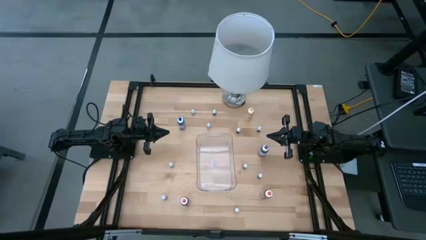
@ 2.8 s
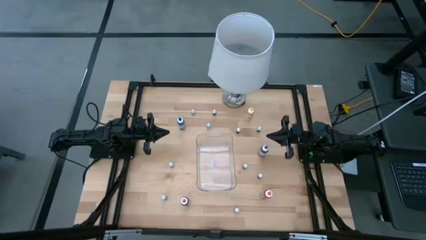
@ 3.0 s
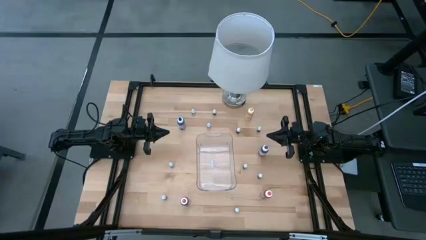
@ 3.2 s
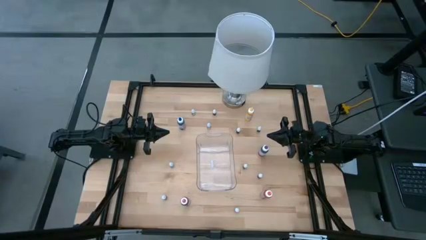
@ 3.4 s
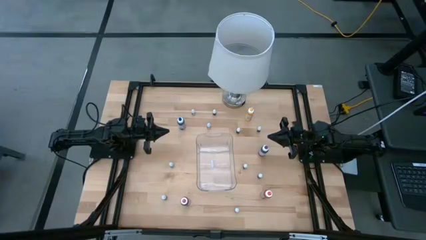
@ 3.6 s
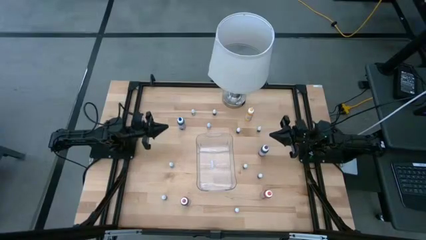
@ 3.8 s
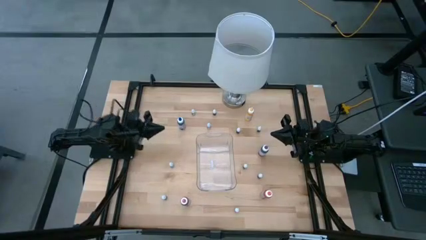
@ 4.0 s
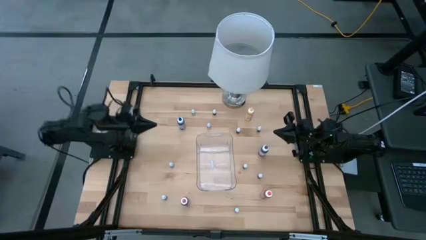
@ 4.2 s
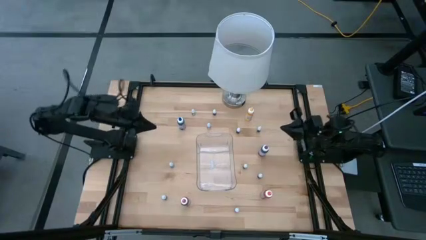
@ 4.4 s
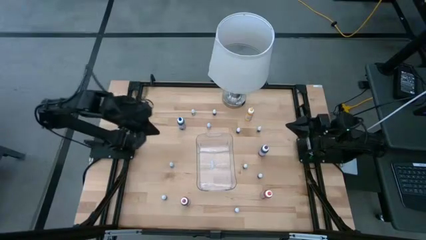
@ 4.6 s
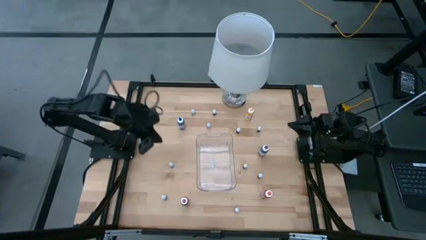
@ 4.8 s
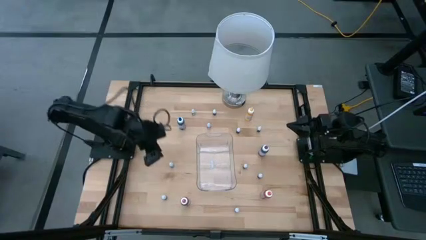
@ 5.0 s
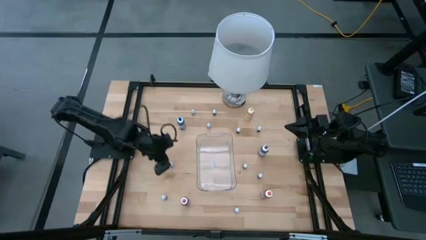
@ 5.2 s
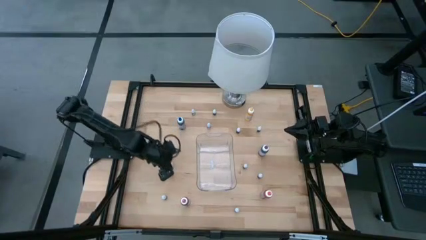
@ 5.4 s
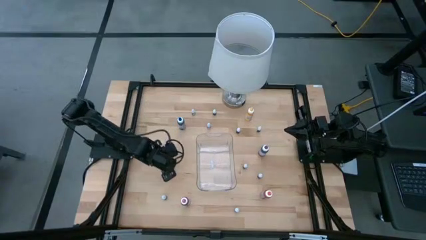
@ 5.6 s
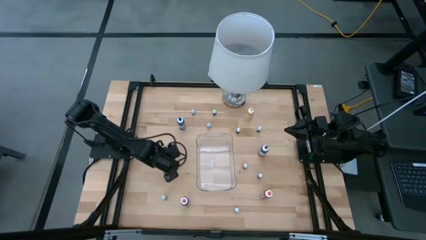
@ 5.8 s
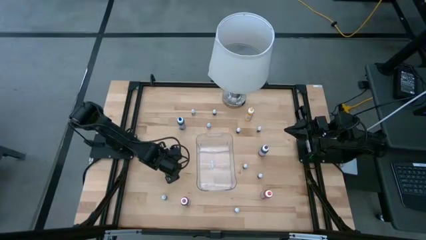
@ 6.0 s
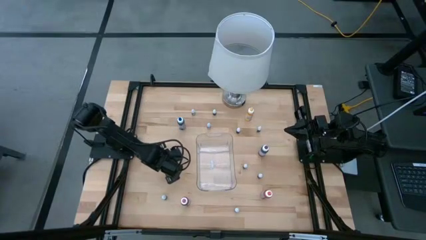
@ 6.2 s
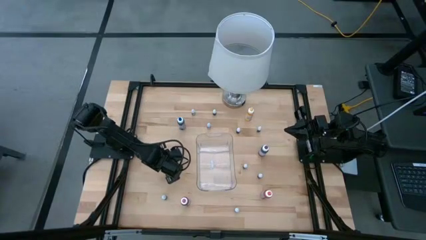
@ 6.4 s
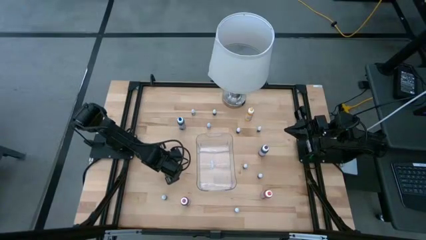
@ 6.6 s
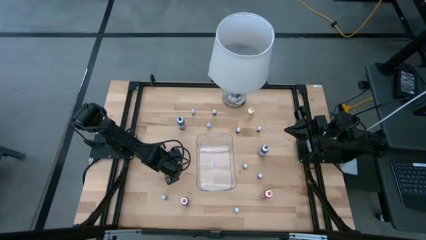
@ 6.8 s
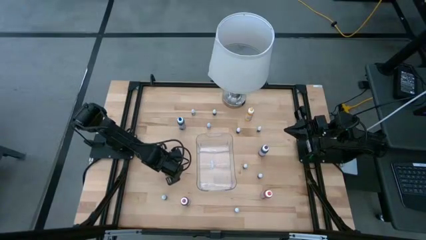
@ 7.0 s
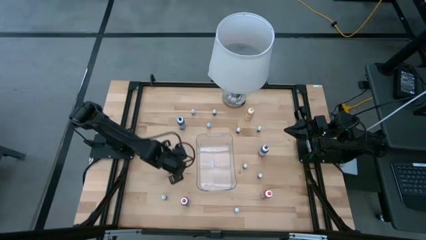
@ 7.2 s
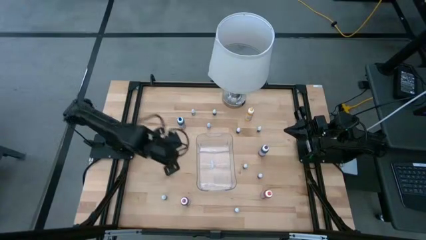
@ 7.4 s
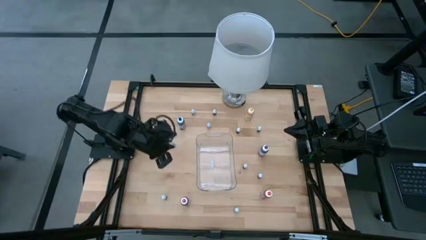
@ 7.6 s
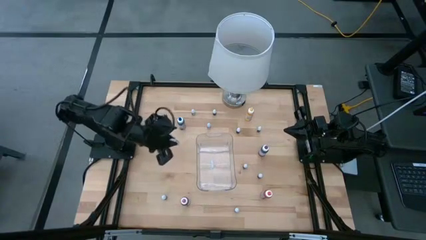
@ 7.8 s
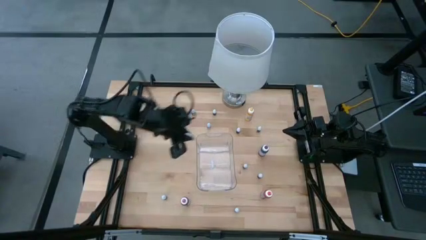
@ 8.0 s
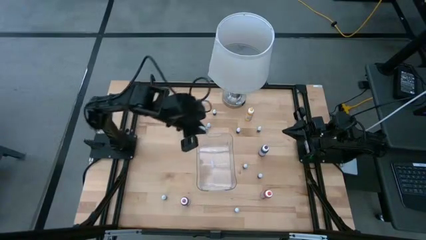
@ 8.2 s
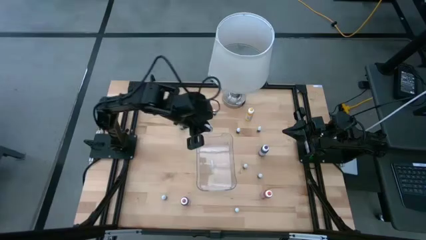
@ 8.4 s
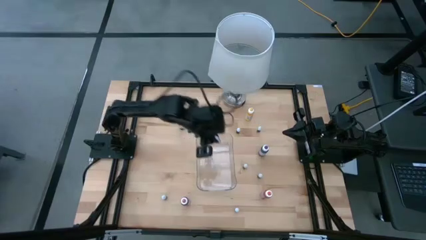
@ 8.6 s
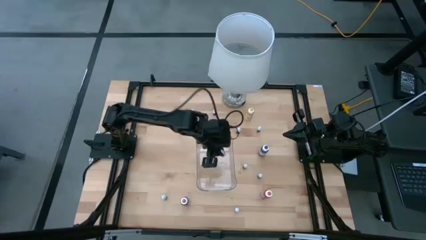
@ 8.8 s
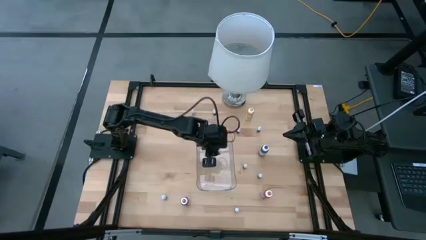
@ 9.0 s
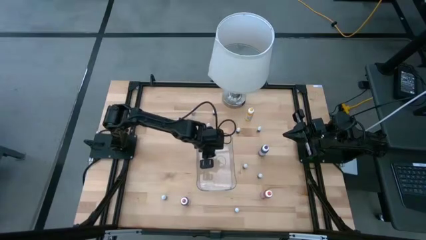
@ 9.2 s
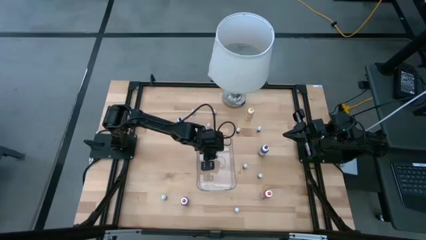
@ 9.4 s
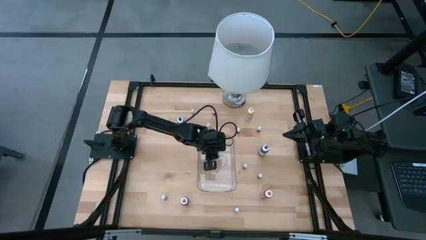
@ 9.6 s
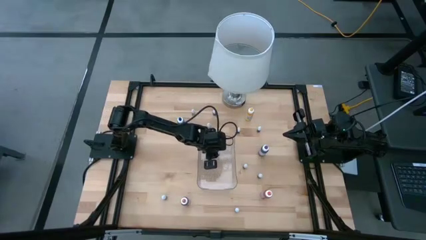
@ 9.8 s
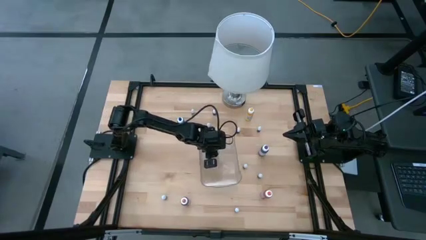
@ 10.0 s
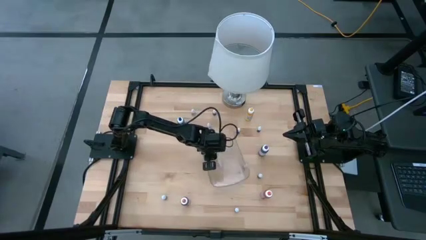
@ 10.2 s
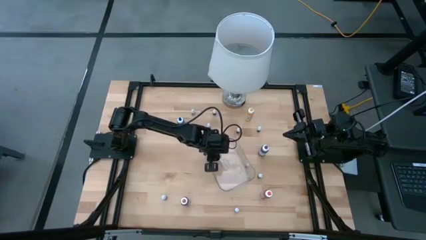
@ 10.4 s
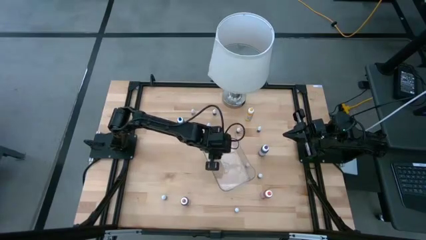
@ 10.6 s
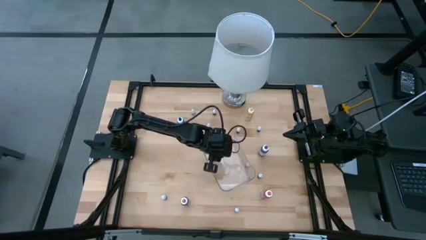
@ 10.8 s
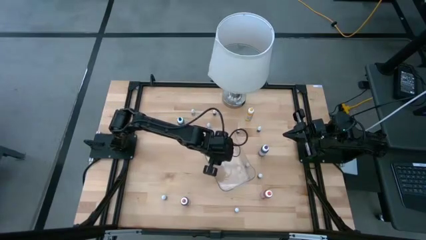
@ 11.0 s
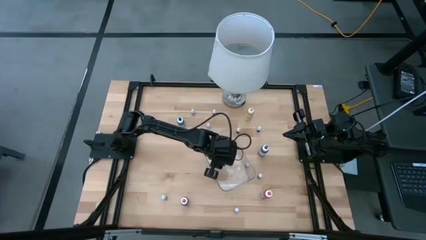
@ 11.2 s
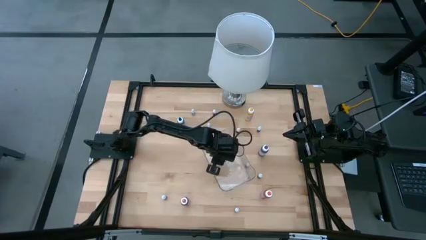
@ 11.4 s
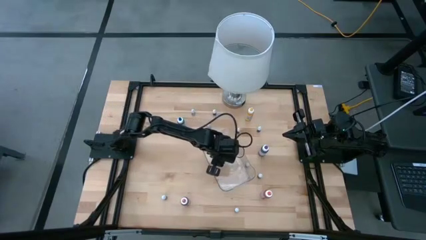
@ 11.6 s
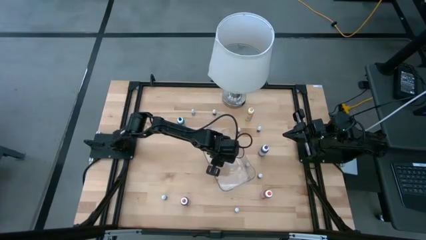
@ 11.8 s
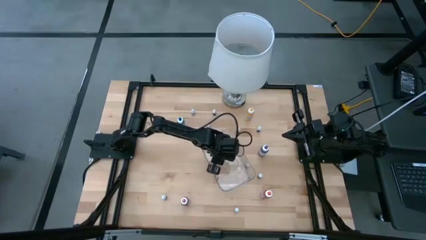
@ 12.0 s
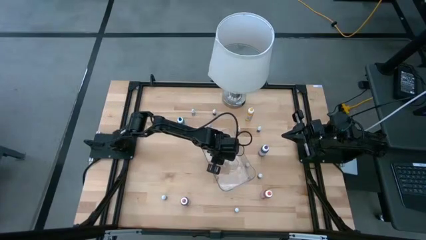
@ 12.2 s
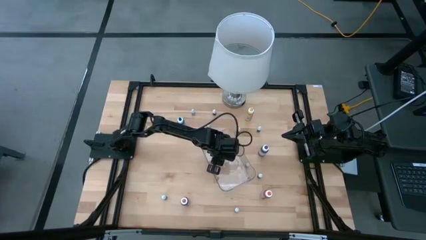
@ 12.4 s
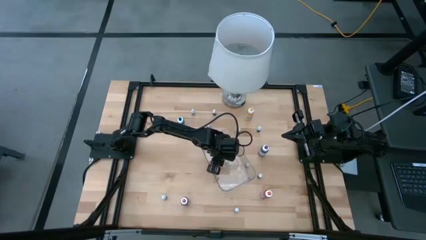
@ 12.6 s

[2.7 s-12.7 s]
Task: Pick & Place food coloring
Put the bottom left small blue food coloring bottle into the transparent bin

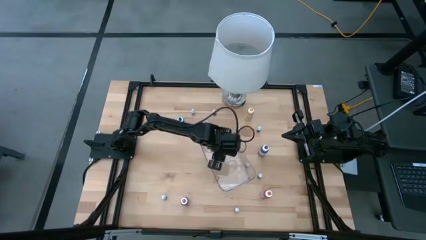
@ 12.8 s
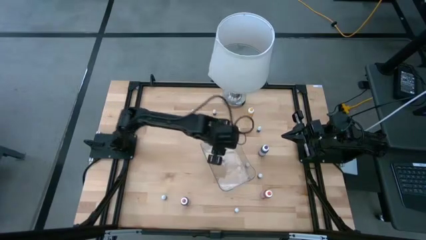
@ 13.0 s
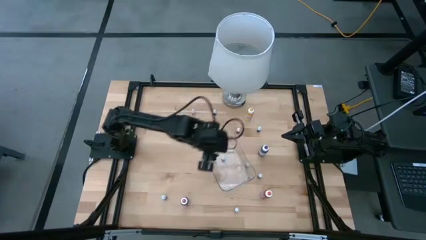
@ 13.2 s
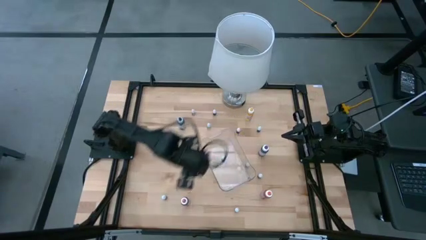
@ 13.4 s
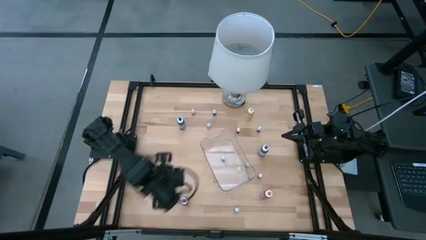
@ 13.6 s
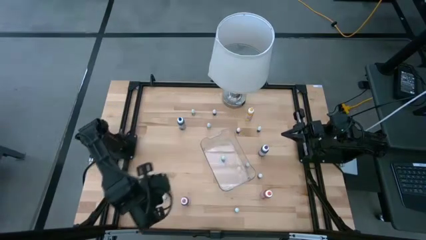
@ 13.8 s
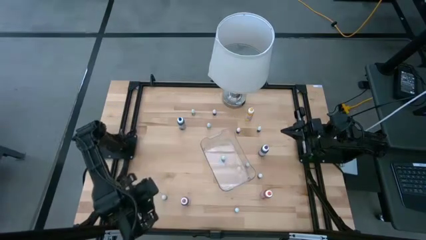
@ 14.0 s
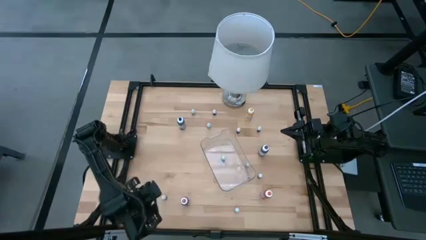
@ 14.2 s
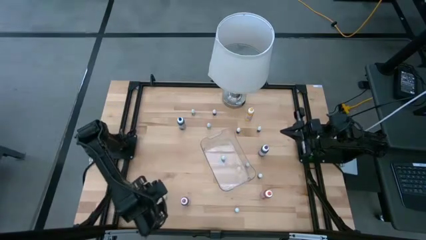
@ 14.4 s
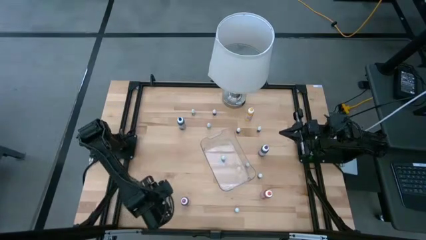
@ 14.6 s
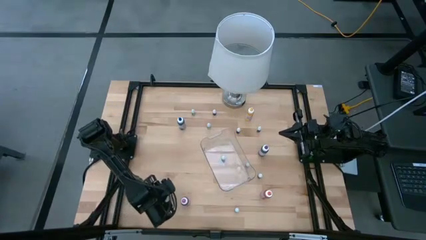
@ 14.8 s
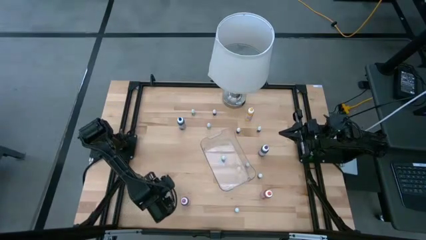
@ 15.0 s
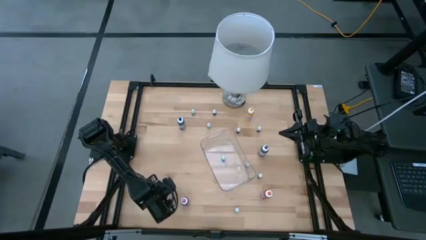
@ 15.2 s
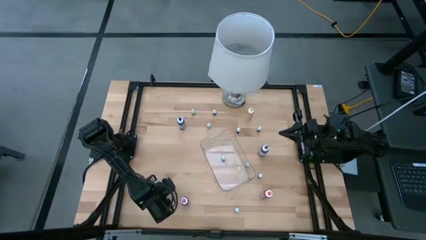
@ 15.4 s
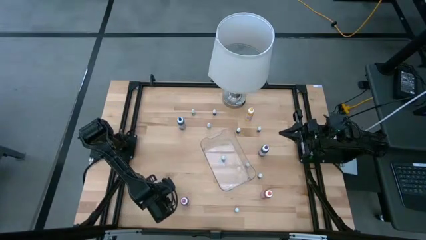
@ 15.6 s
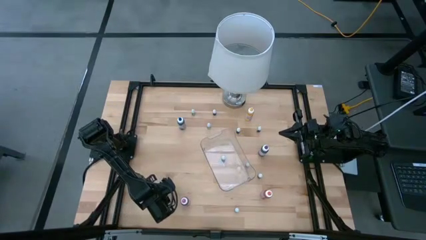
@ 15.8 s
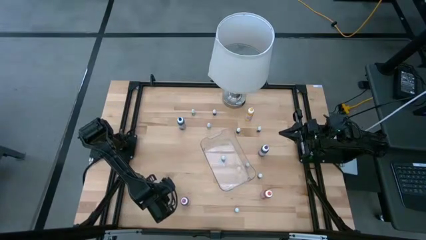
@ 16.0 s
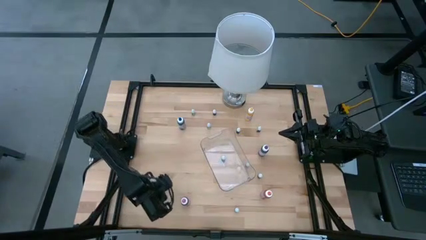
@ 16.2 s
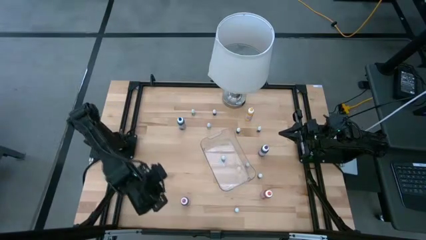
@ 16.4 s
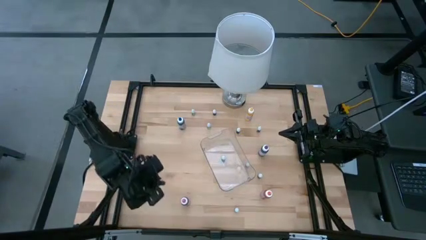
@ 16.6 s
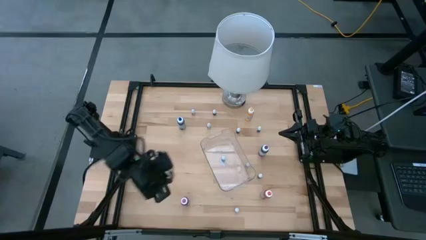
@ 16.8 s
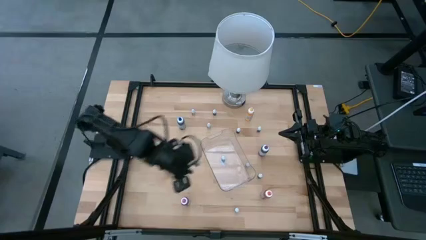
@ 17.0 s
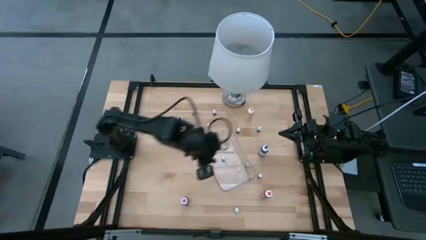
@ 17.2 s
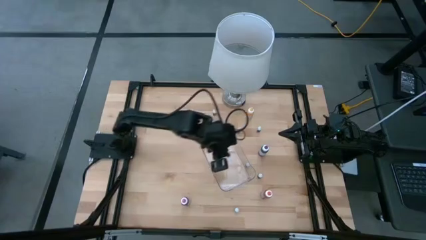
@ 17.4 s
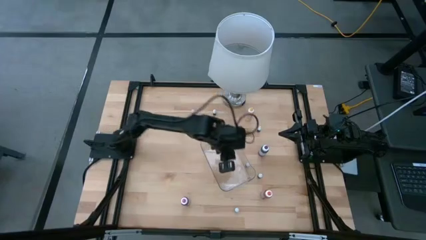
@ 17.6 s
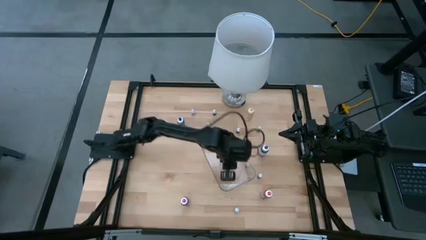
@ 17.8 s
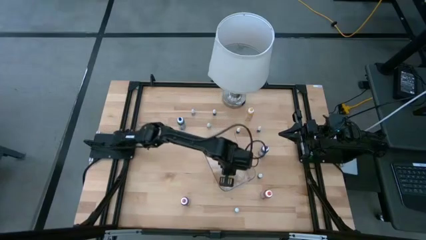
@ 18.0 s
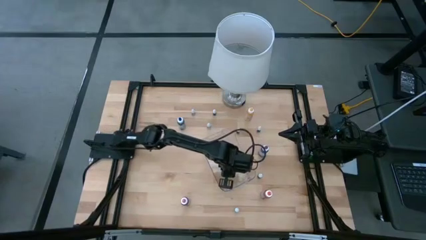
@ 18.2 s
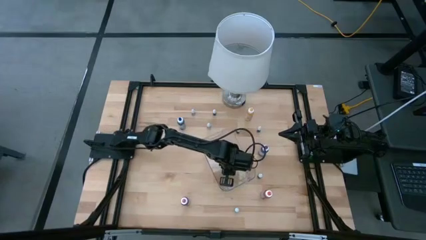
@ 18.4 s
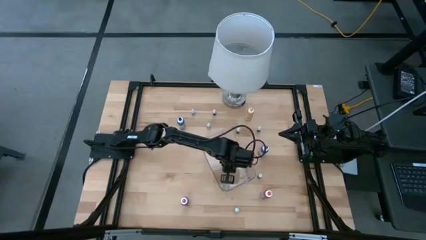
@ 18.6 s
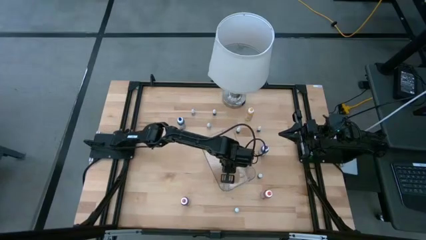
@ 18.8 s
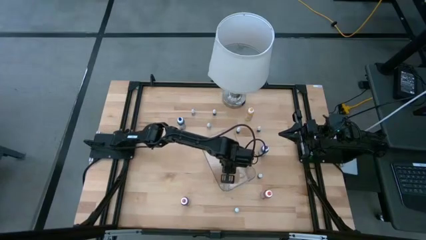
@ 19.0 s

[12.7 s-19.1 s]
Put the bottom left small purple food coloring bottle into the transparent bin

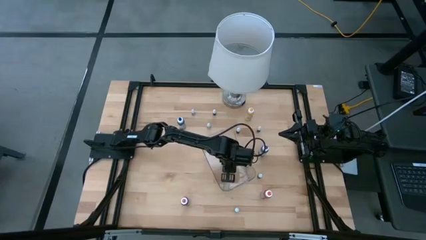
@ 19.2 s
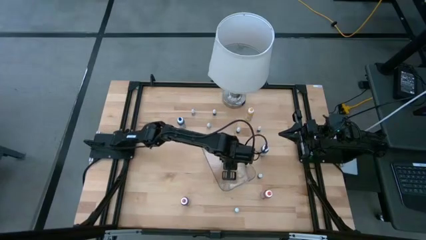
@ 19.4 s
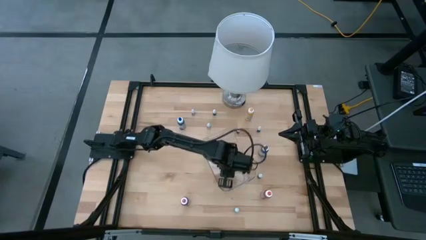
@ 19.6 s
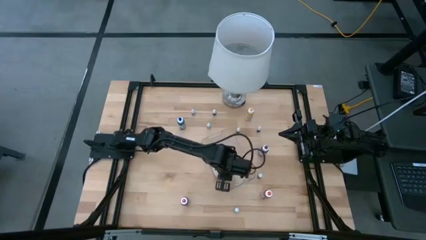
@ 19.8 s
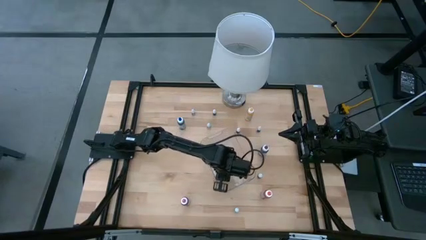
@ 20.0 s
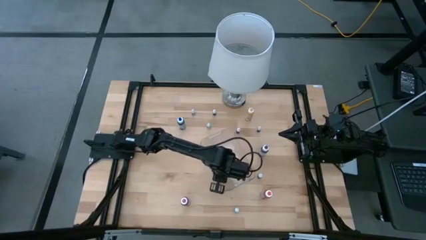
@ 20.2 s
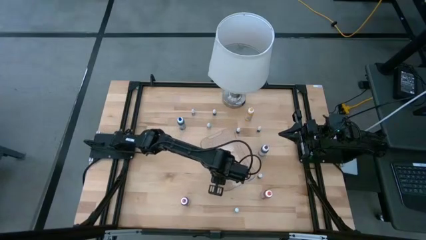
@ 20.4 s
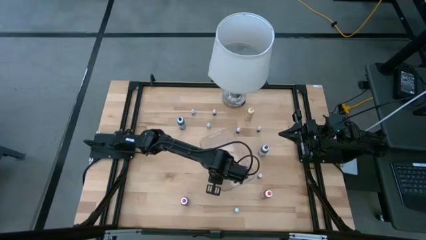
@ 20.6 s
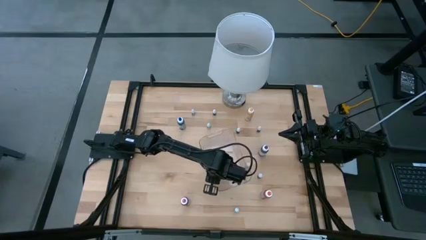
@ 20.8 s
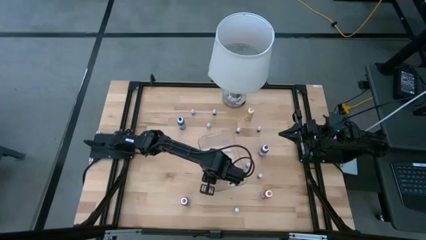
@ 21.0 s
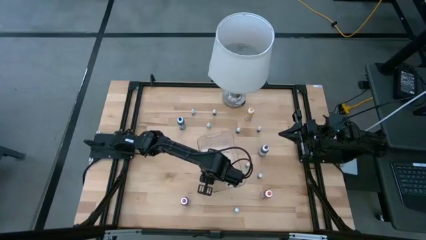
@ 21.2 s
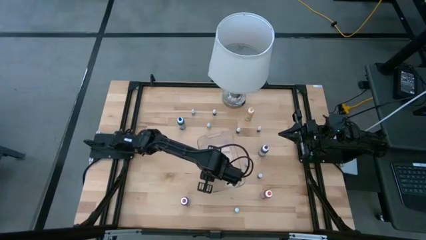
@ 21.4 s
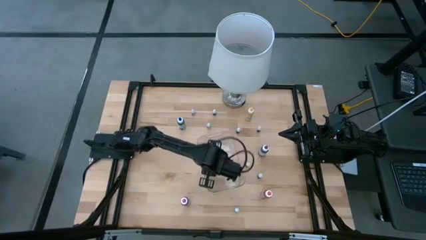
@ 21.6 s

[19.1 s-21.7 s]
Adjust the transparent bin
